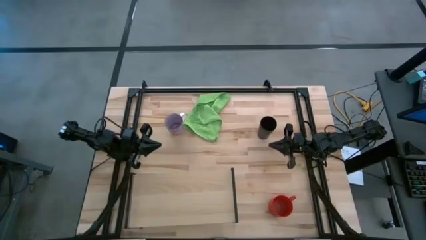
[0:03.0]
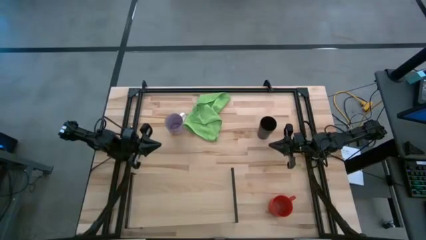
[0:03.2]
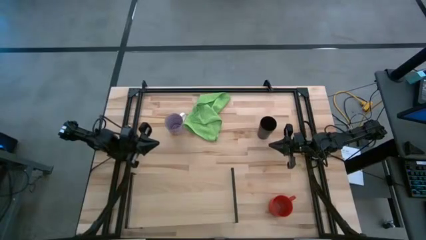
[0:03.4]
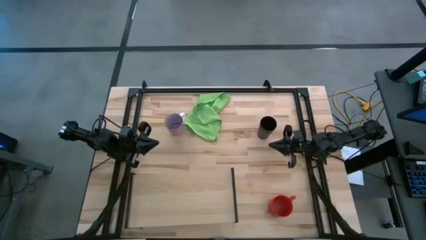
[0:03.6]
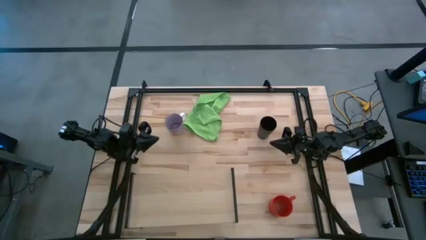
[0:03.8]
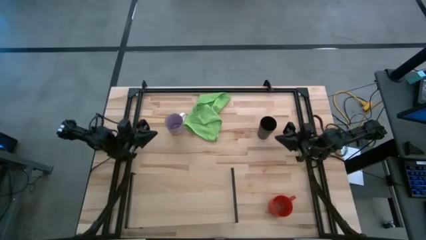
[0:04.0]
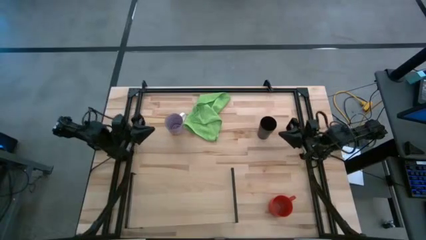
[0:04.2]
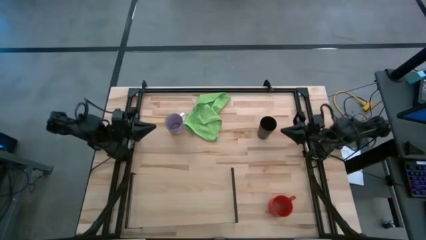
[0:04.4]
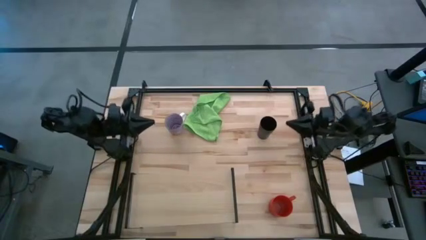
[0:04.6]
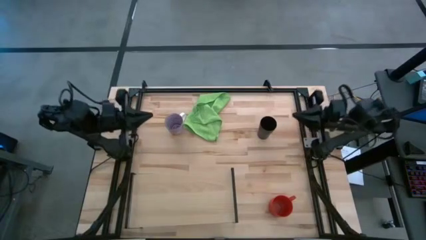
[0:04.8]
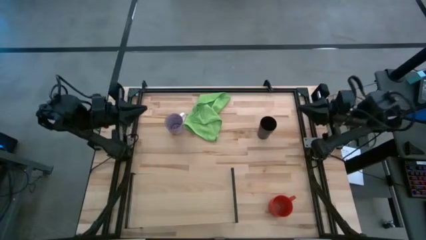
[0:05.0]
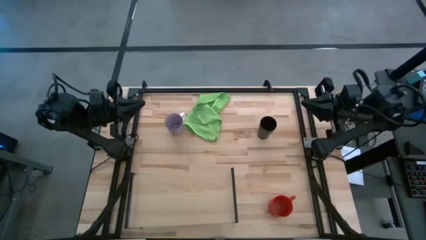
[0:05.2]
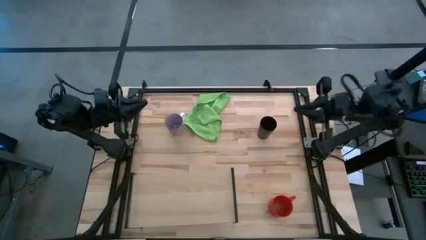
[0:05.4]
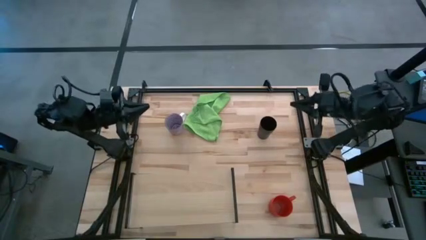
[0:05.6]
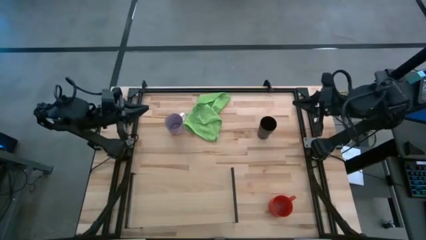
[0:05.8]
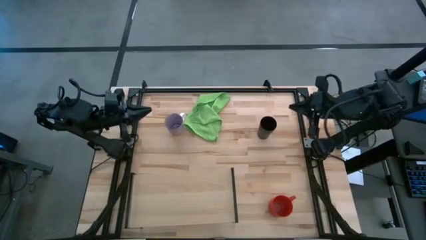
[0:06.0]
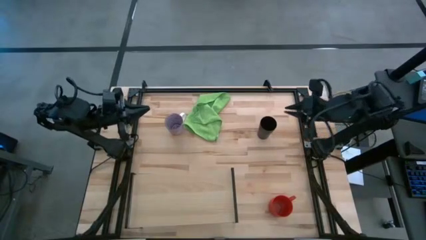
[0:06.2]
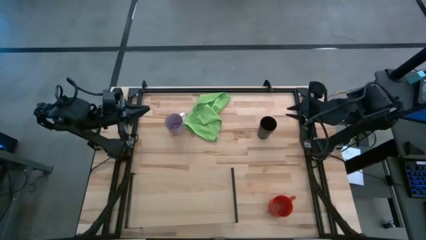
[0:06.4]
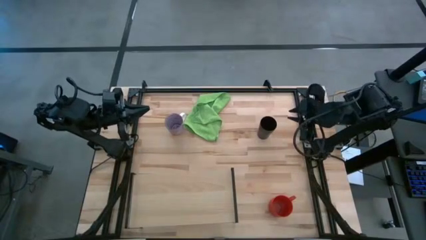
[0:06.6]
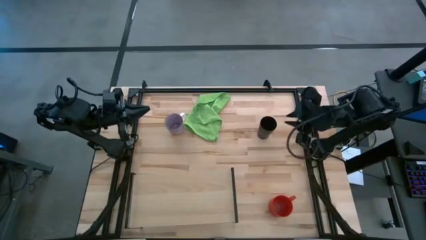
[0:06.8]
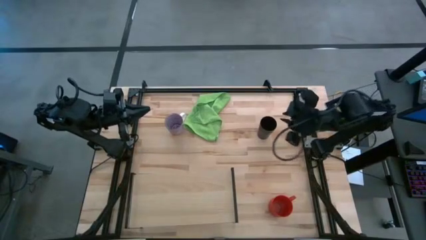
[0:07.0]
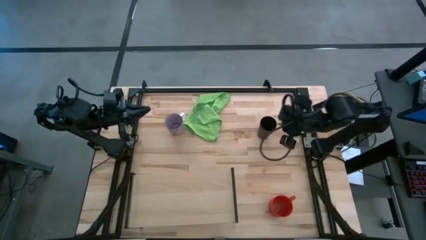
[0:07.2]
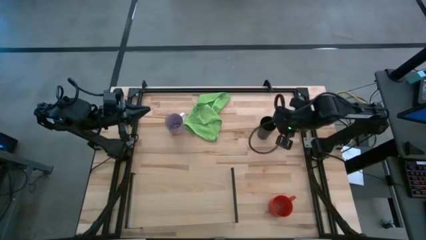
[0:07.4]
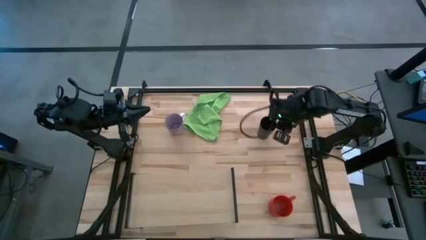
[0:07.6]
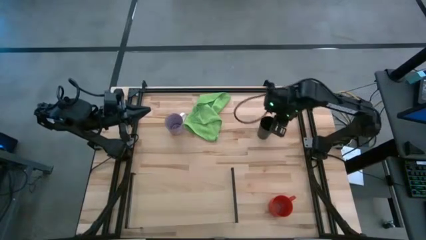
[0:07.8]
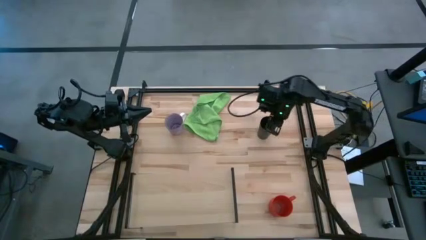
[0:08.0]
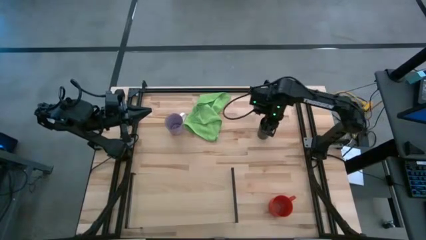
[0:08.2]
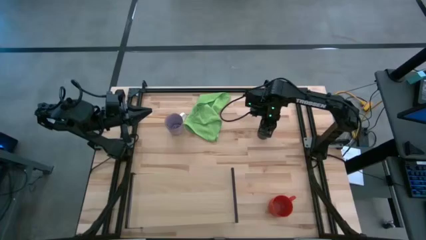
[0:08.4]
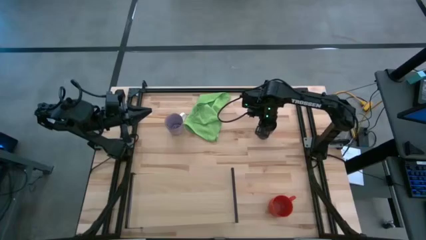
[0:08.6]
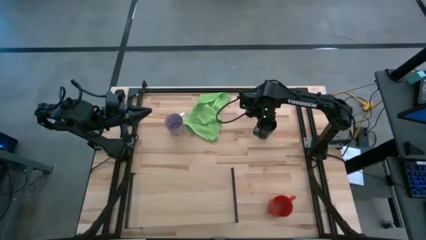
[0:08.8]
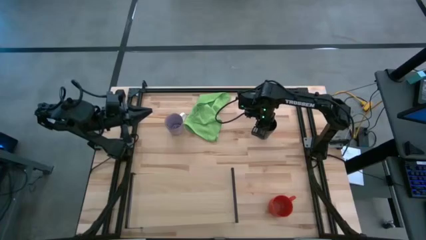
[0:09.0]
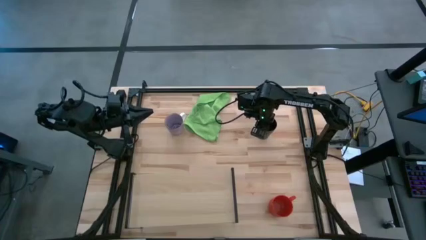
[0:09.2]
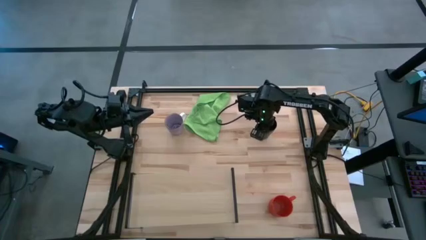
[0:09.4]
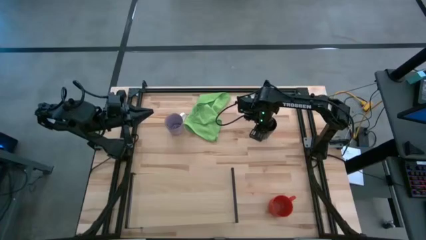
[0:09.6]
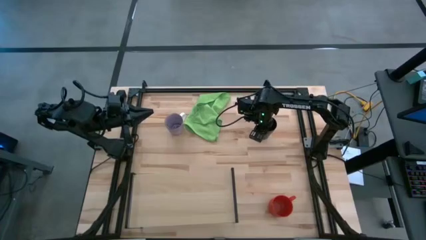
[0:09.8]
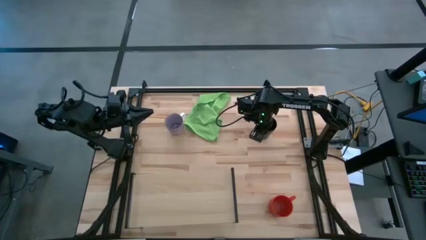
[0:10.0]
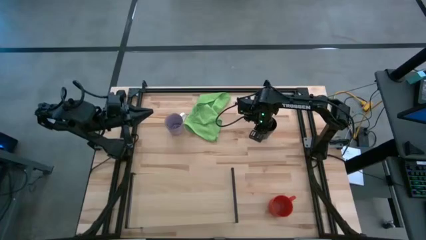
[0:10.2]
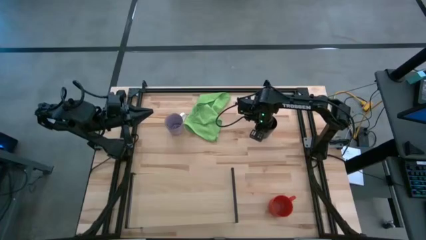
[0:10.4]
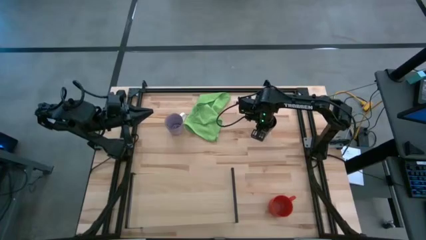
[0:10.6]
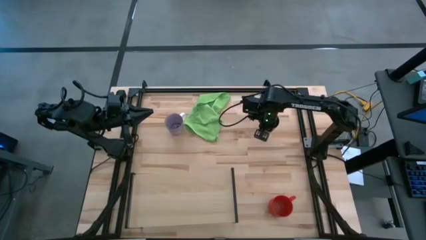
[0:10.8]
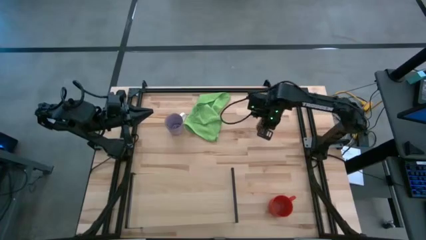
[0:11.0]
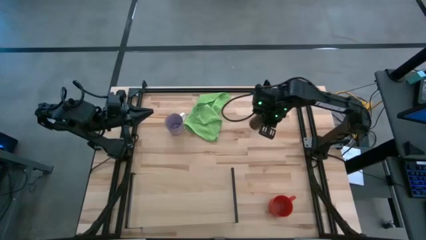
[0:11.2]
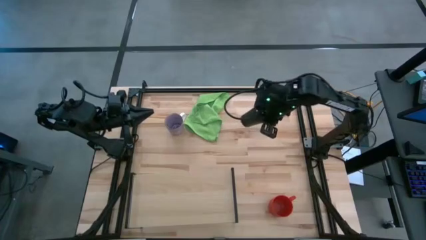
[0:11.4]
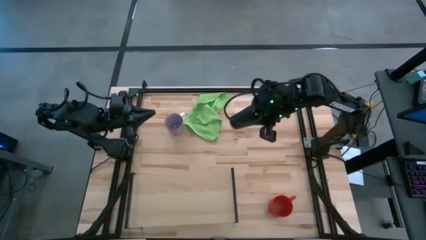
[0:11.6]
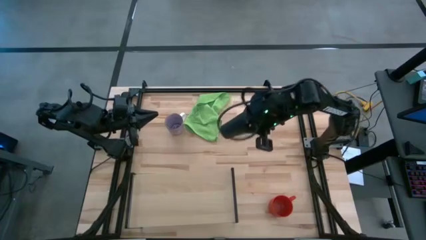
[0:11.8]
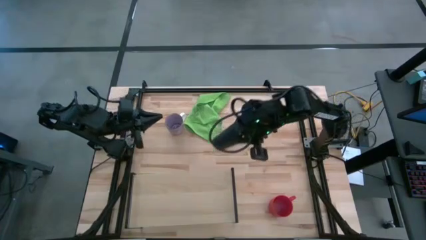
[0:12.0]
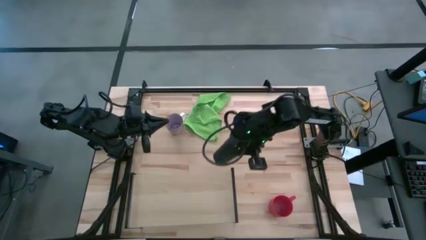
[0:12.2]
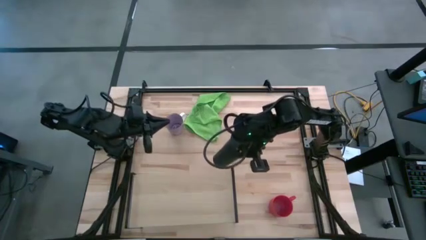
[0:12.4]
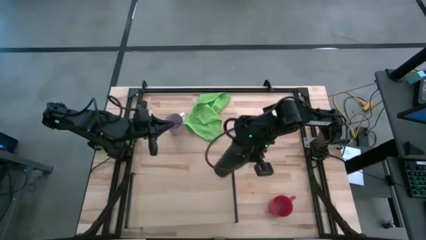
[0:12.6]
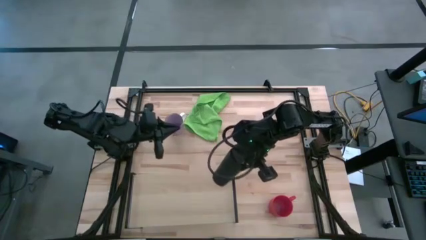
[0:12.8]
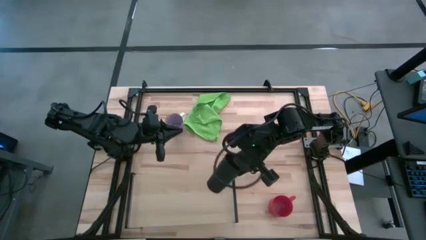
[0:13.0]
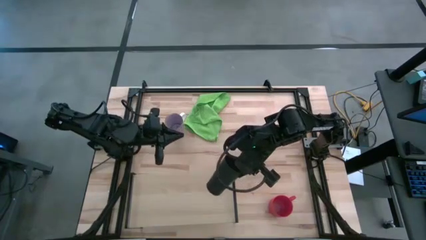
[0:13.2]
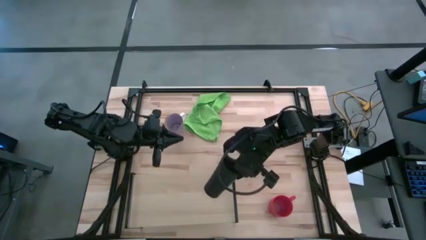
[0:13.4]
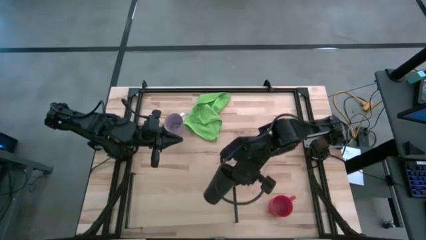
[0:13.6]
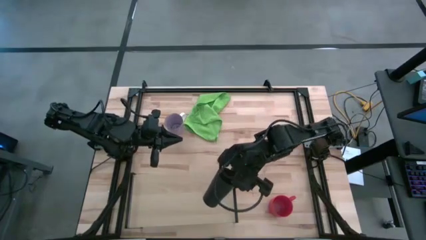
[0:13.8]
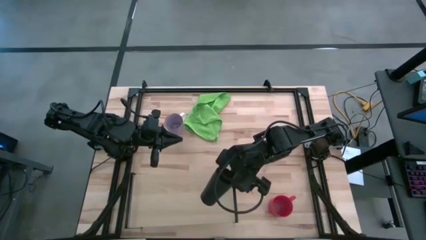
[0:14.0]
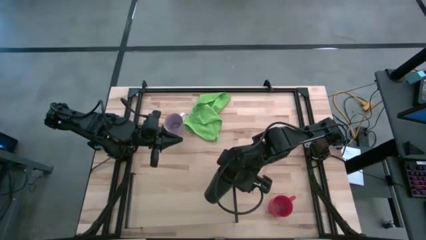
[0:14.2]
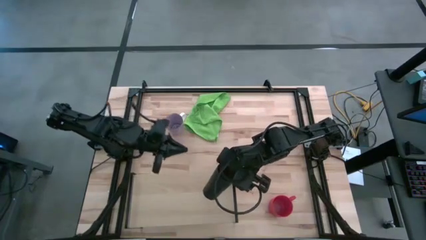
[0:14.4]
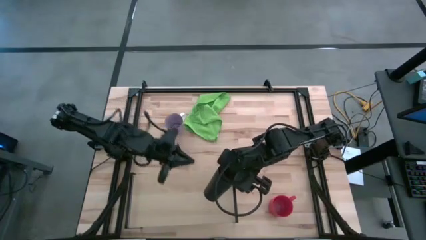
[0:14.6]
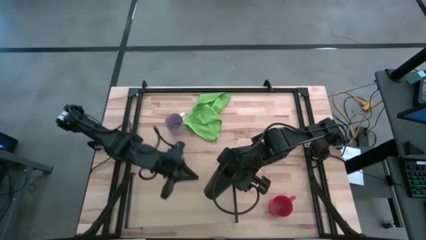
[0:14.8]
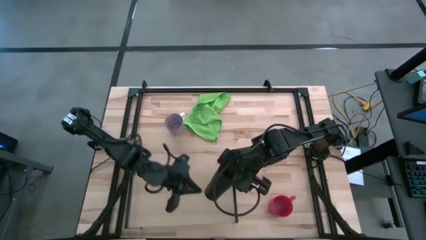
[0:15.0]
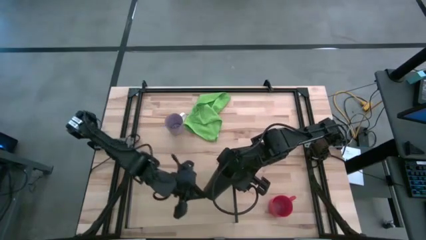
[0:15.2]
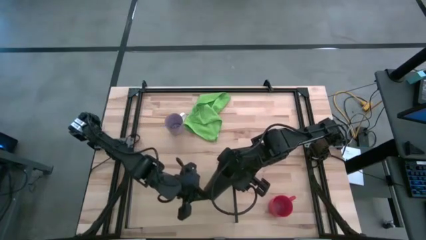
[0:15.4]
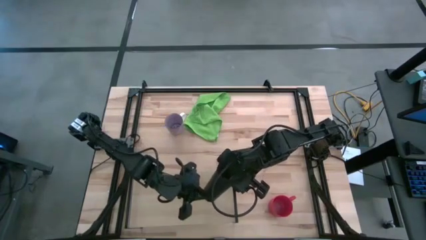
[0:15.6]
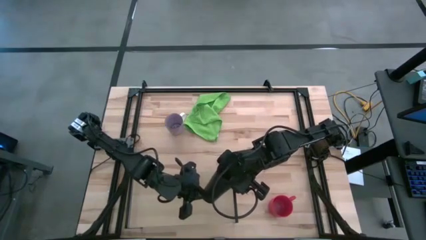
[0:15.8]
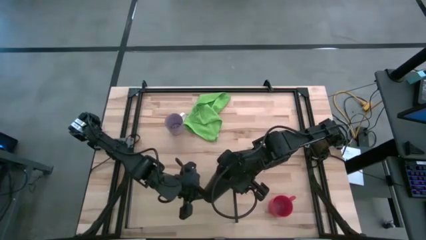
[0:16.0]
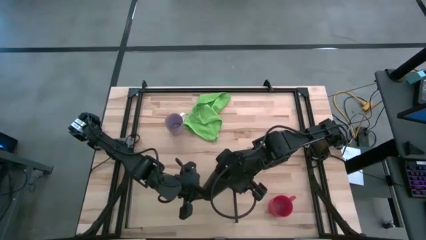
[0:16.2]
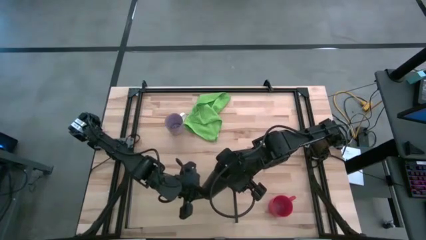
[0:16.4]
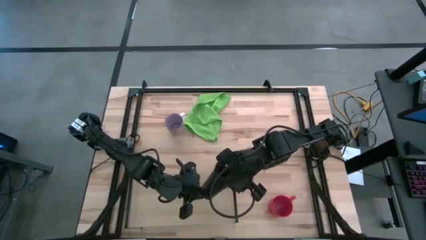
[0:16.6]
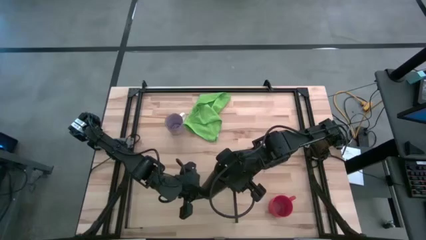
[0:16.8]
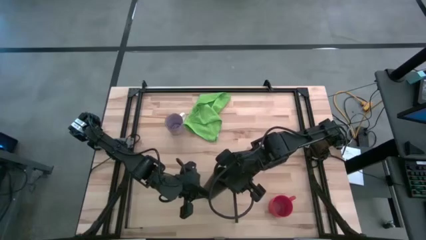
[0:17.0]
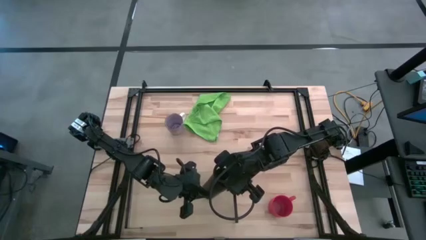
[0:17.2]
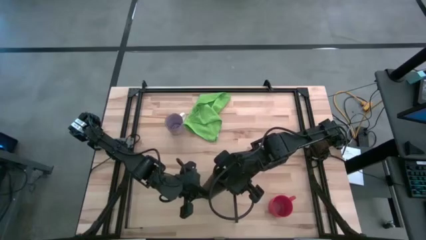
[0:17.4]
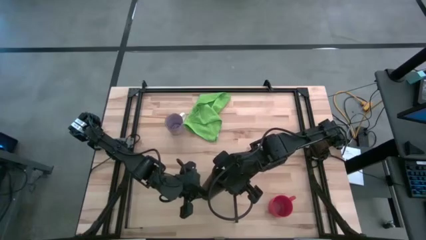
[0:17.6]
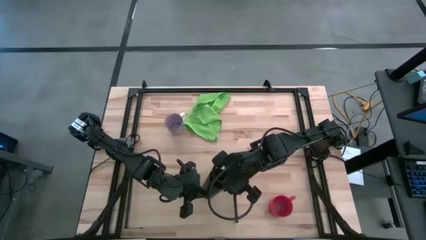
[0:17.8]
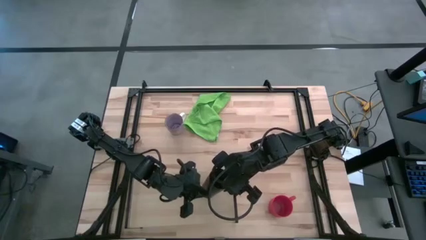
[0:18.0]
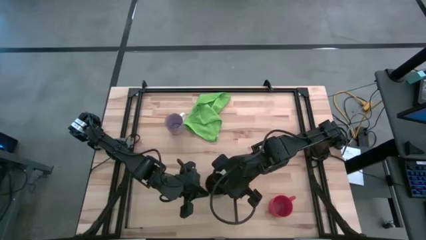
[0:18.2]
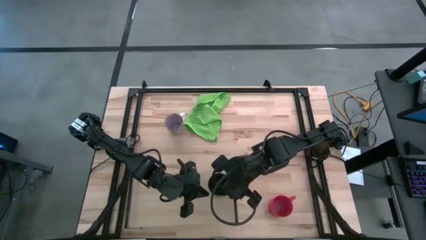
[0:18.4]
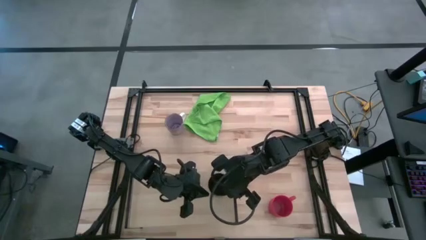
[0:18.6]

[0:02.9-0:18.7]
Task: Stack small to large cups/mugs on shelf
Put the black cup on the shelf
